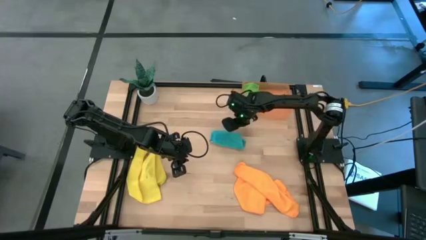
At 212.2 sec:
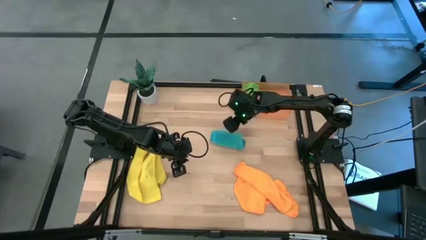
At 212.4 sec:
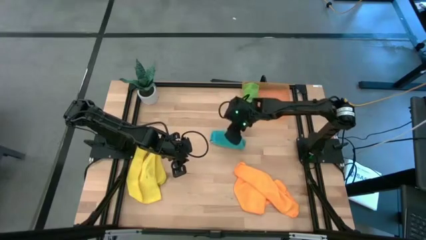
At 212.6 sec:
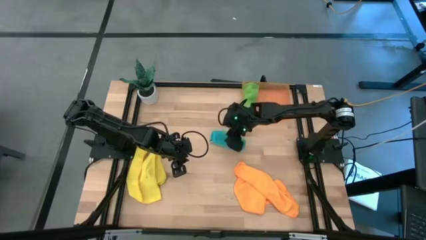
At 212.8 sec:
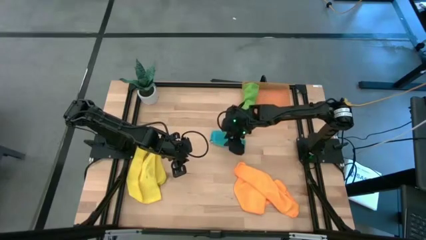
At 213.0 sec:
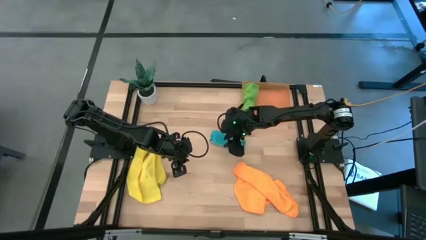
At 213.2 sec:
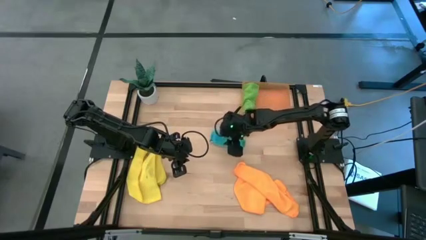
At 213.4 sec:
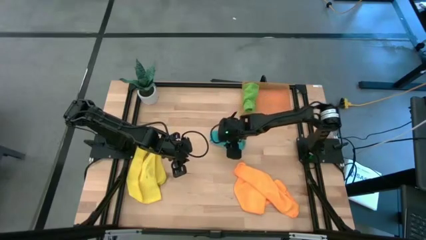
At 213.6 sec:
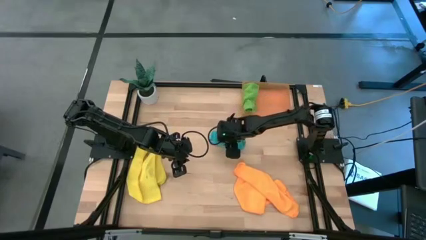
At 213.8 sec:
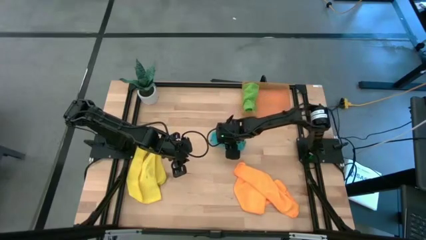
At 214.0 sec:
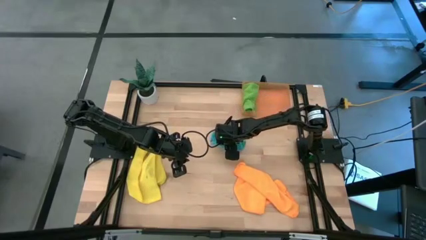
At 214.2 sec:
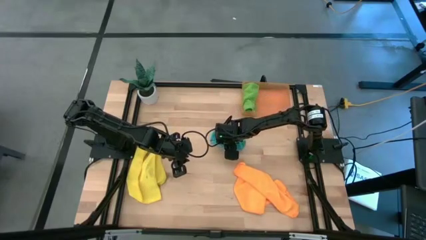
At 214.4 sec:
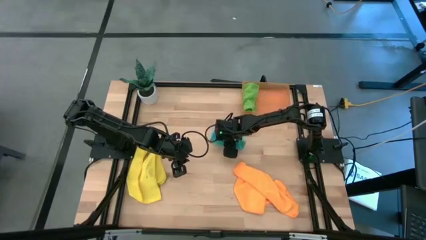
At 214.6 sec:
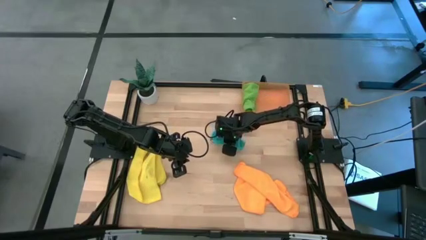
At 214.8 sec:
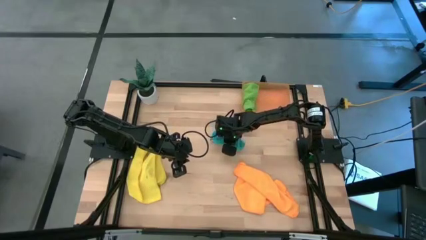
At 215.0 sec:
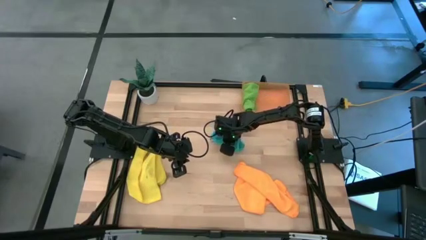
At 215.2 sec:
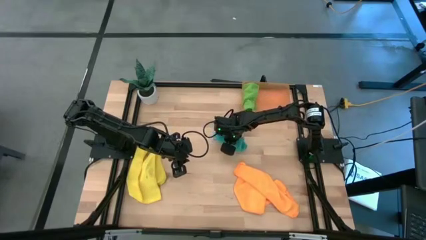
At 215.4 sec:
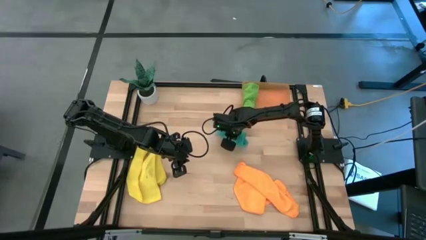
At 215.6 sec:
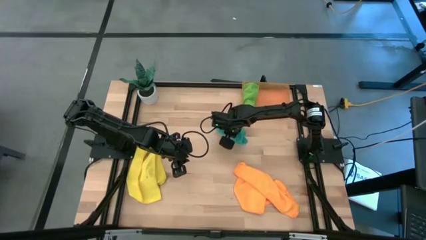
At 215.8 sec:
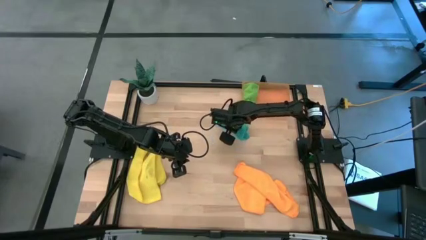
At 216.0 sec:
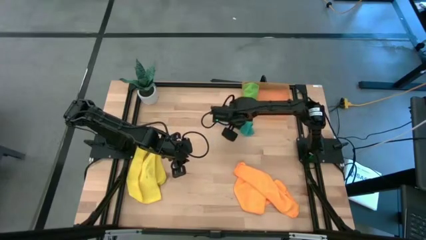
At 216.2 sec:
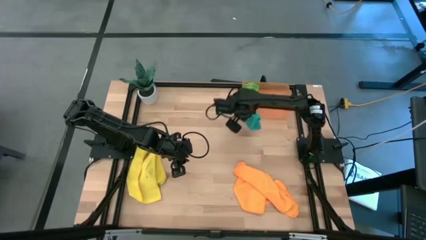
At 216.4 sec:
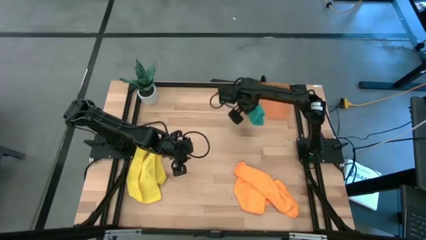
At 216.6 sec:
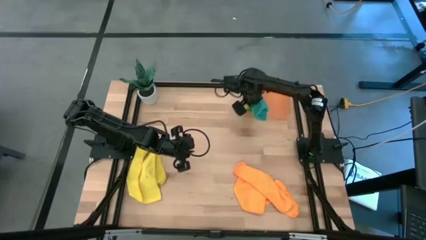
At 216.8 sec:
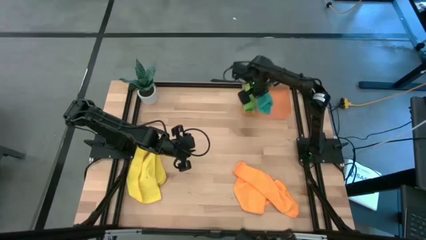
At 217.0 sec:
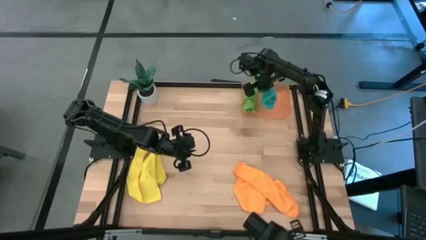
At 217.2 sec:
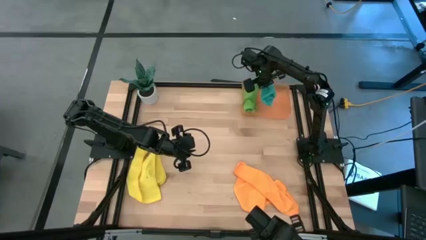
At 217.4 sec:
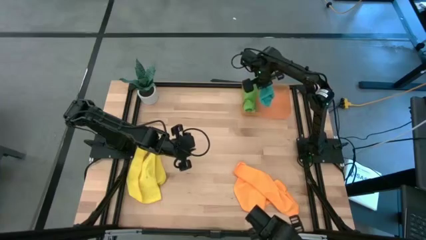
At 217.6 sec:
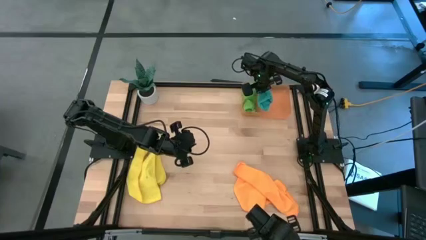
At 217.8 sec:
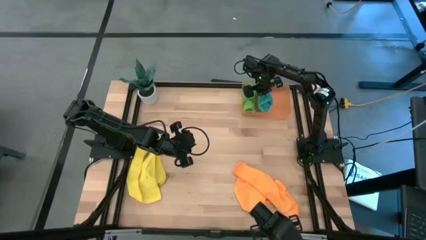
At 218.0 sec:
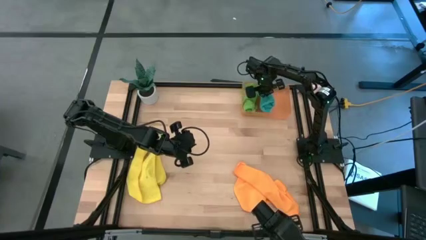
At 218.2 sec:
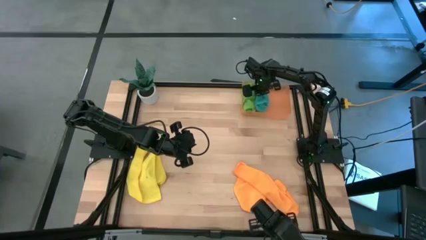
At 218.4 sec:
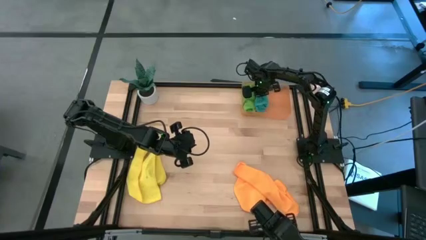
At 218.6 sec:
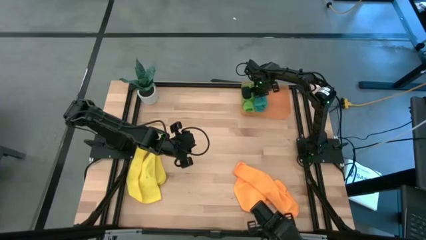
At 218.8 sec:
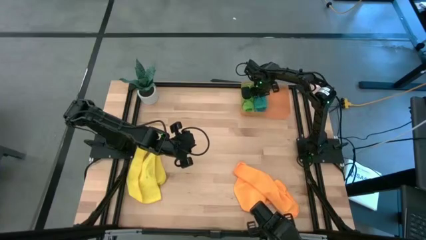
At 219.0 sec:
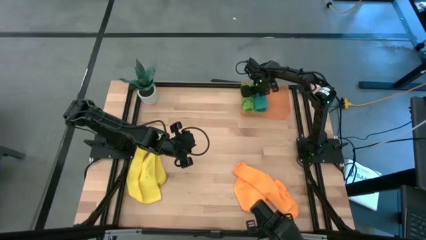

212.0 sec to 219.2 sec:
Task: Roll microfiber towels into tight, uniform cylinder then place into a basket
Put the blue towel into the bin

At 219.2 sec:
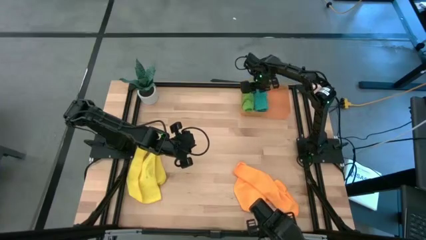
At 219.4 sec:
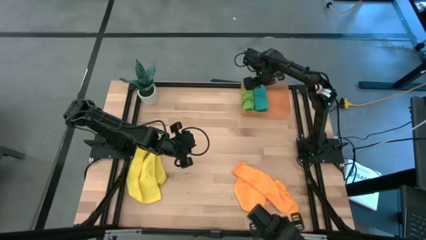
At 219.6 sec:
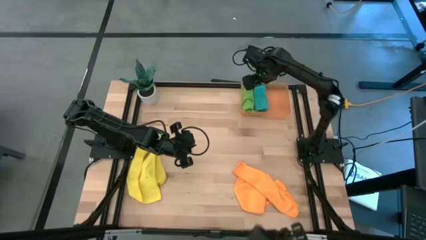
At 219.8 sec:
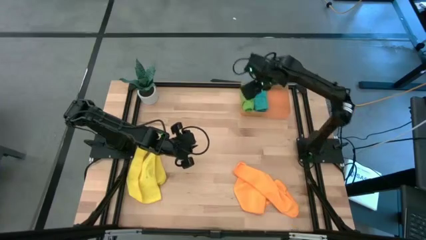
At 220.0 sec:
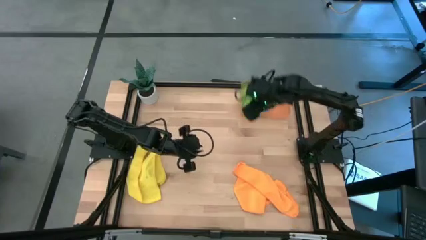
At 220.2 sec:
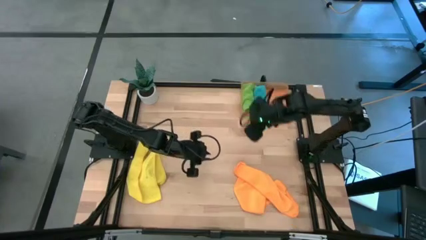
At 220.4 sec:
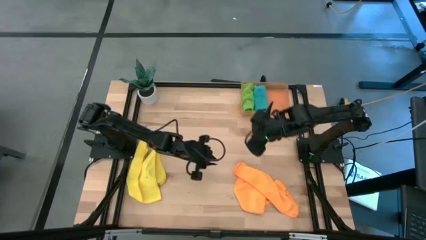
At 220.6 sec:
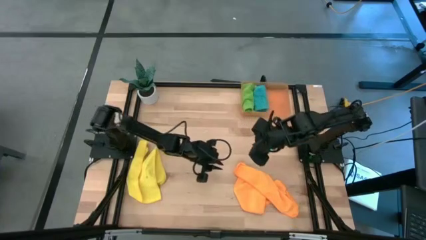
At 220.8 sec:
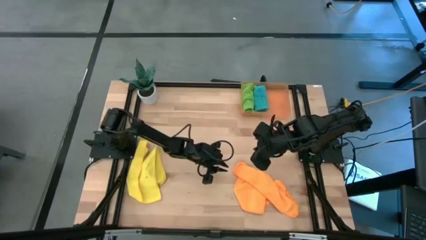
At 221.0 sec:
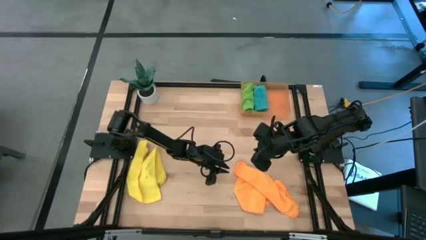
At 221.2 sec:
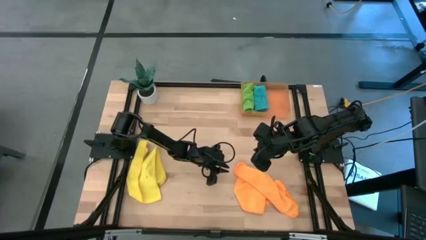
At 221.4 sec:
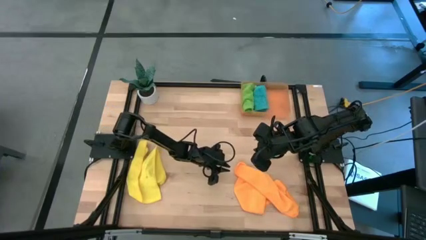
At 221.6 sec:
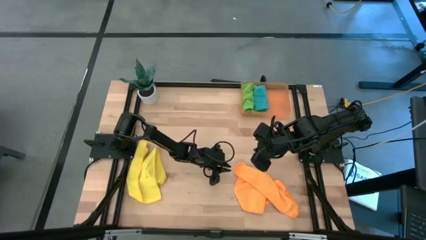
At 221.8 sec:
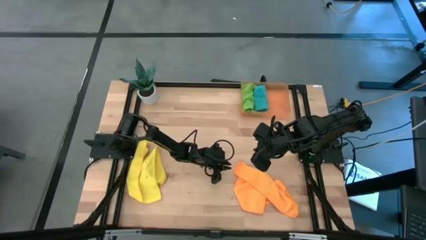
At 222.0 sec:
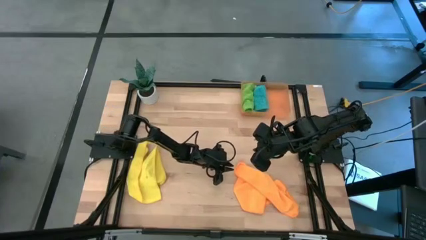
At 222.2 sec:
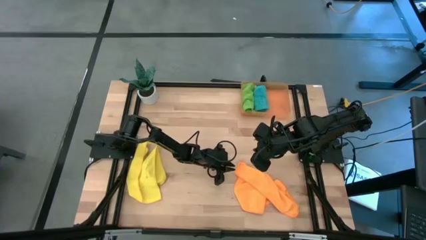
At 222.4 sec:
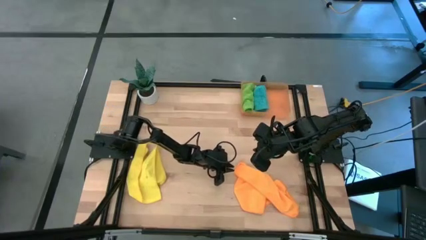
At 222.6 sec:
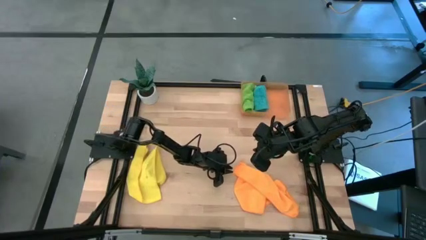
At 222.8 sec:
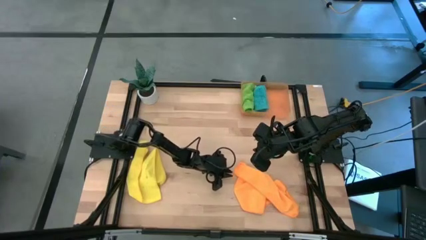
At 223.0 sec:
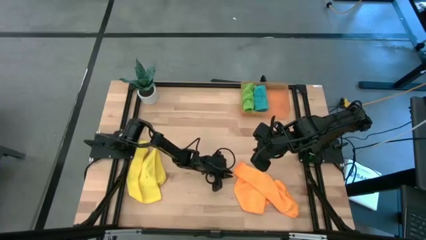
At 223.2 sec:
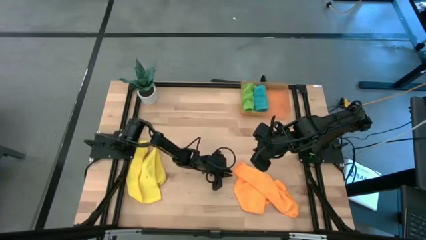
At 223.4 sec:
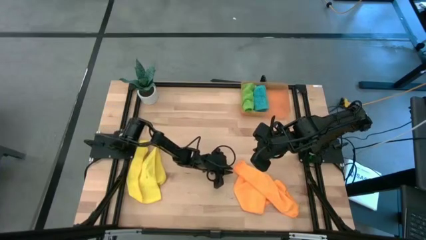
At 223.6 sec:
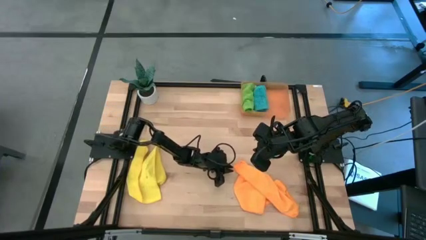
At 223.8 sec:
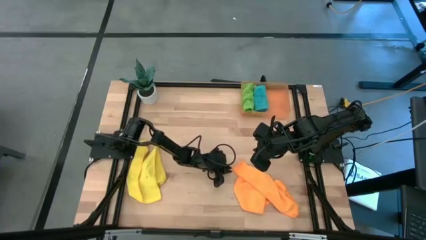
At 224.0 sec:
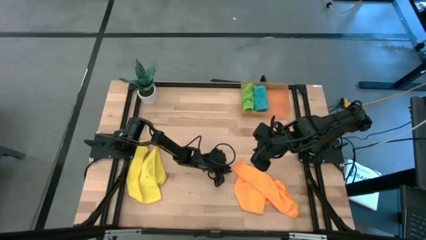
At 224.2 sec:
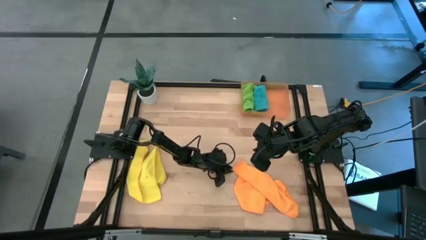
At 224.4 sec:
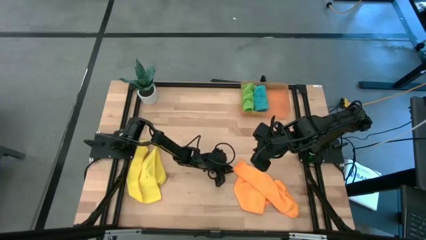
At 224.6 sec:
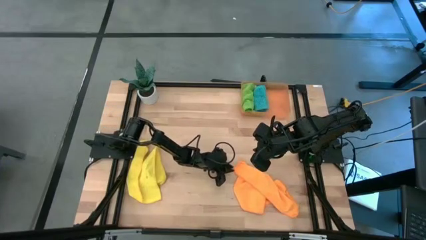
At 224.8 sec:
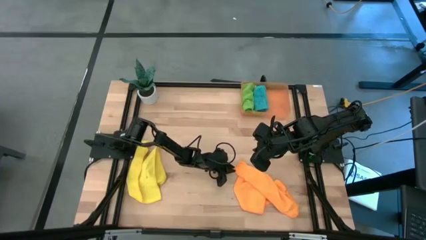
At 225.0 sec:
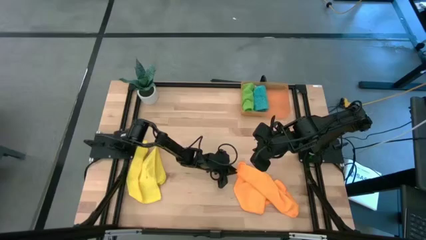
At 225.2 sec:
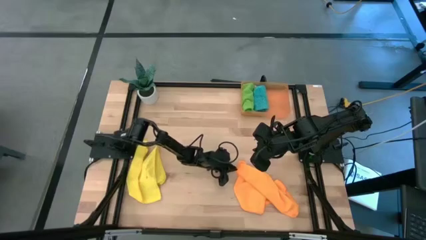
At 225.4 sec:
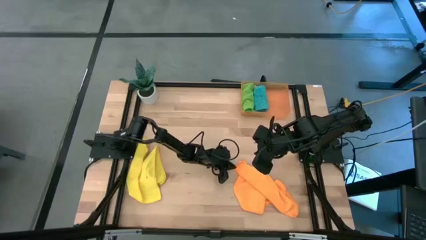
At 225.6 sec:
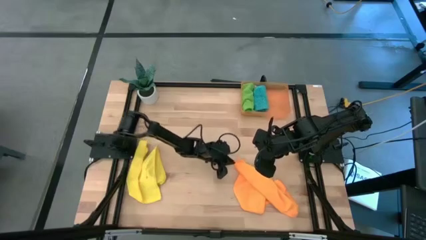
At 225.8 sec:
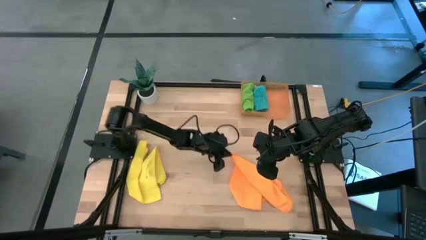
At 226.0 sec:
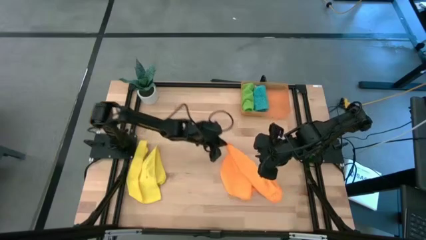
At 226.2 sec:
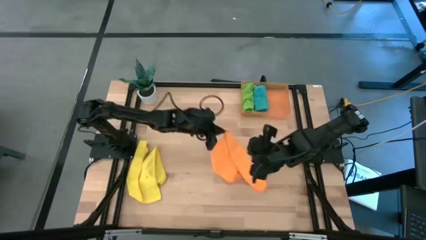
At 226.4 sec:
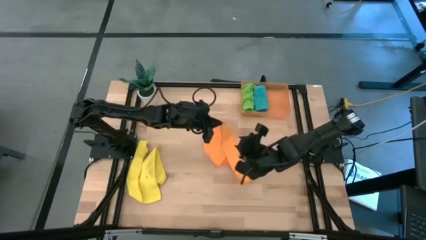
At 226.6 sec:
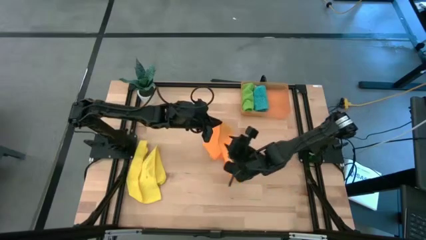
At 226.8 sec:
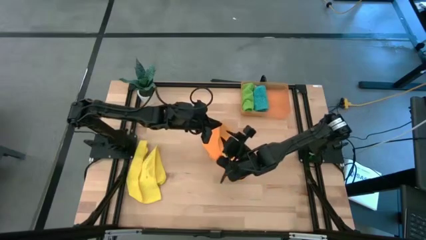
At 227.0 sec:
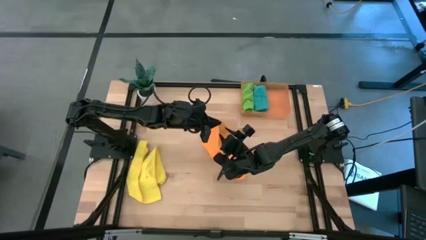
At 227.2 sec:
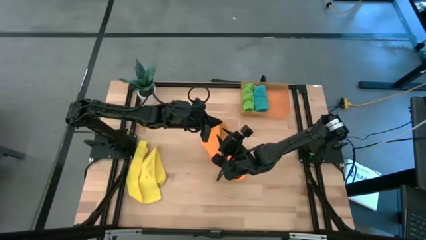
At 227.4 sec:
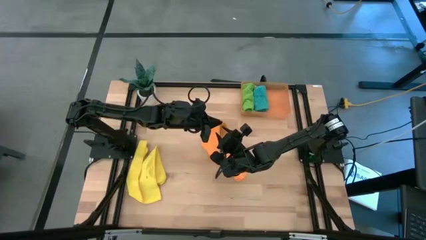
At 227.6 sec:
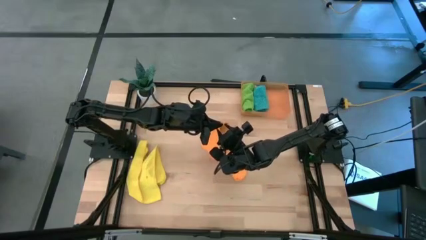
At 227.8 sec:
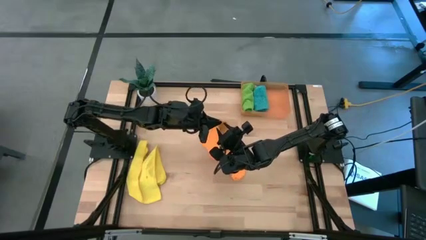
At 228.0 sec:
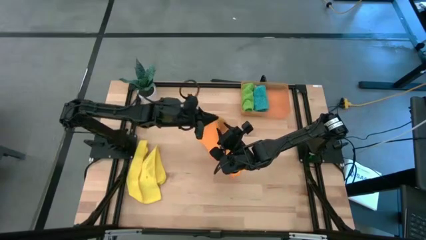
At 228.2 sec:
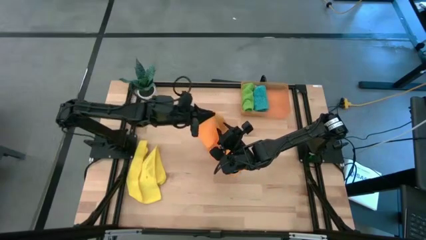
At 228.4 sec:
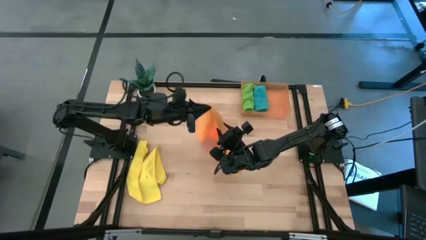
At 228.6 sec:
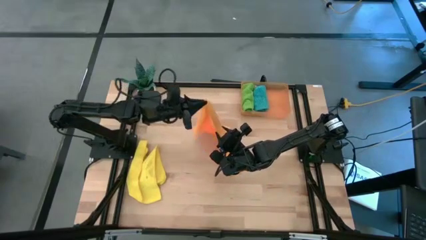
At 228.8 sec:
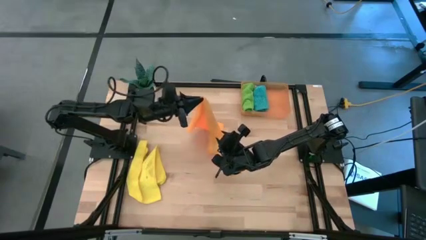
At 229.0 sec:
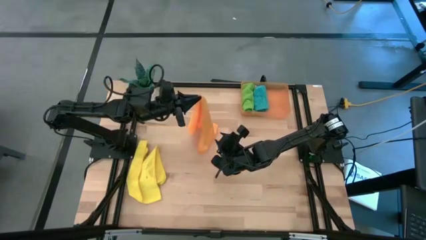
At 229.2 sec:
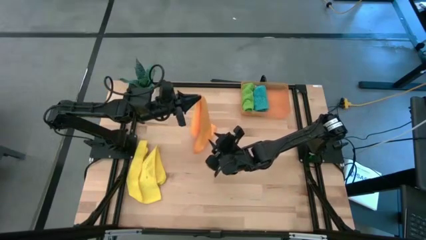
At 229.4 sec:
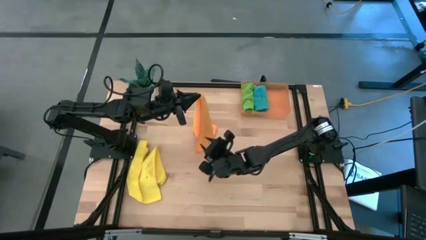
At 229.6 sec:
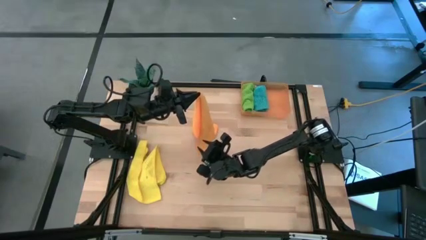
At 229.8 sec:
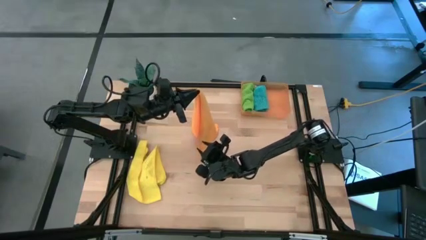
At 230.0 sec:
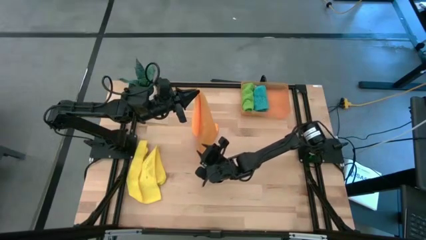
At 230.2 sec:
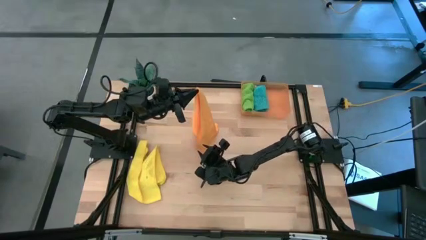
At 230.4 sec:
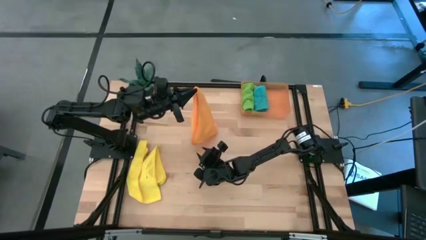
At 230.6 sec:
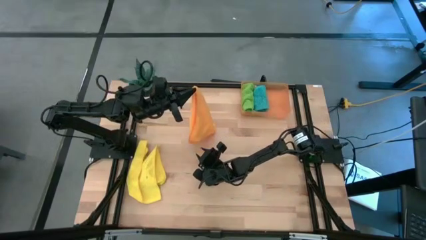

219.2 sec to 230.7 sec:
Fold the orange towel
